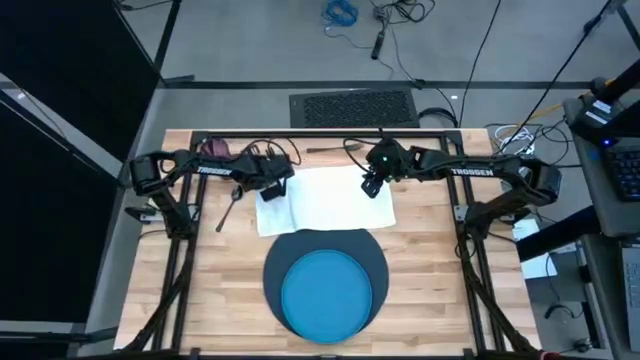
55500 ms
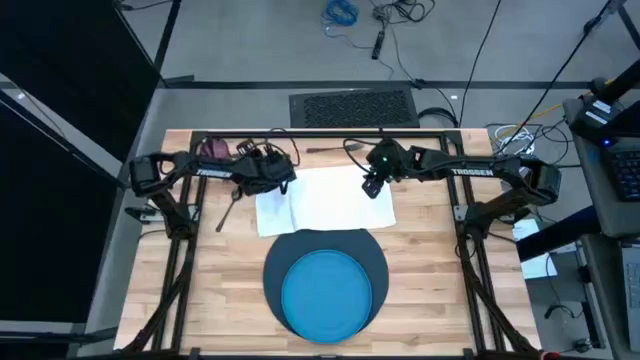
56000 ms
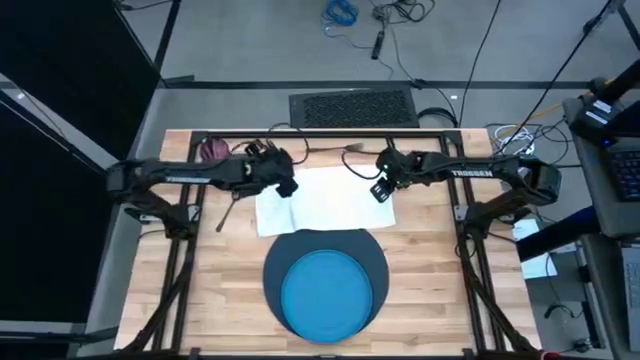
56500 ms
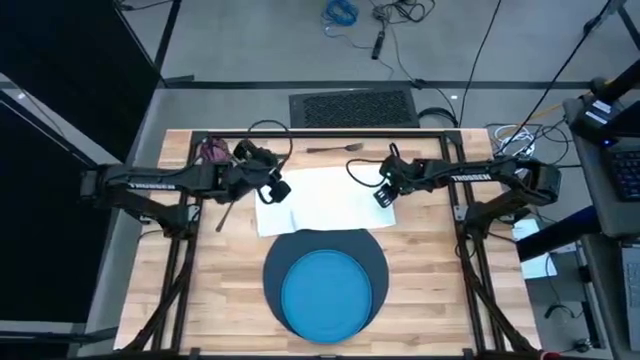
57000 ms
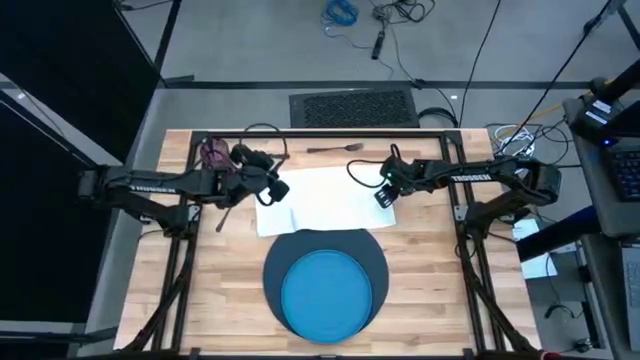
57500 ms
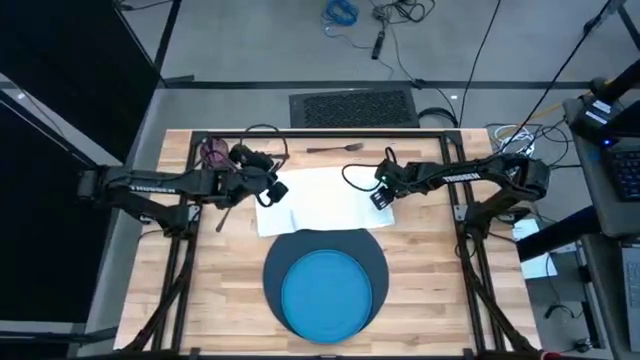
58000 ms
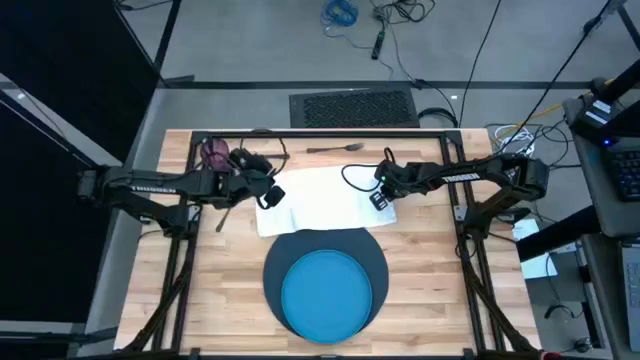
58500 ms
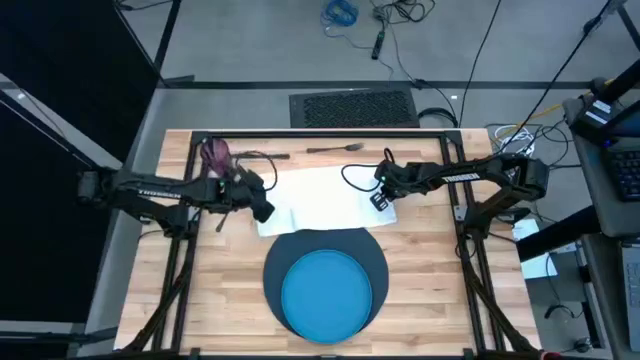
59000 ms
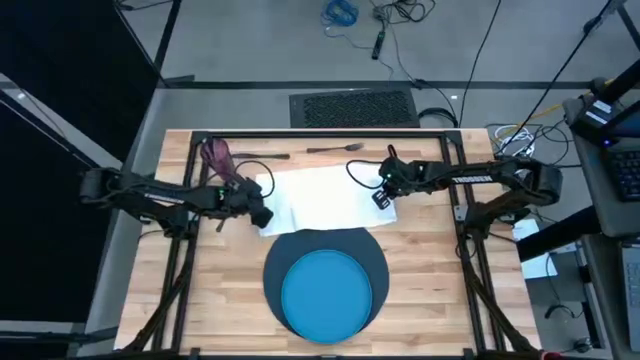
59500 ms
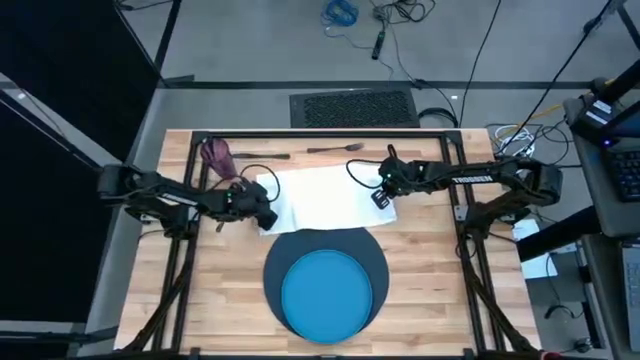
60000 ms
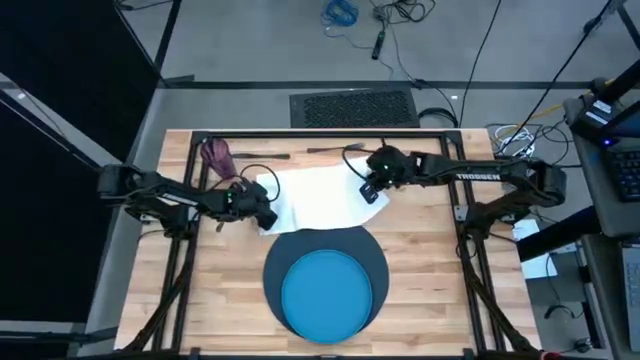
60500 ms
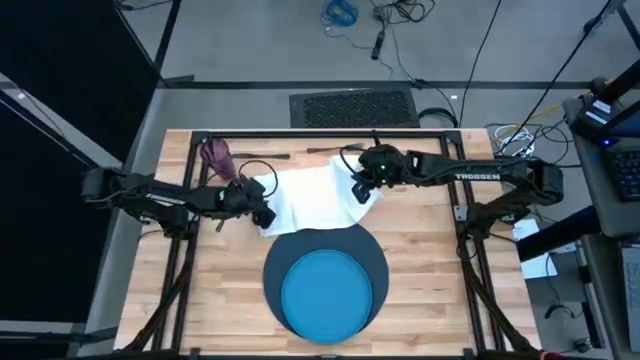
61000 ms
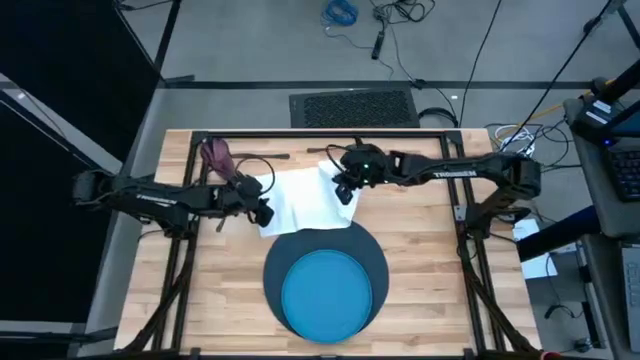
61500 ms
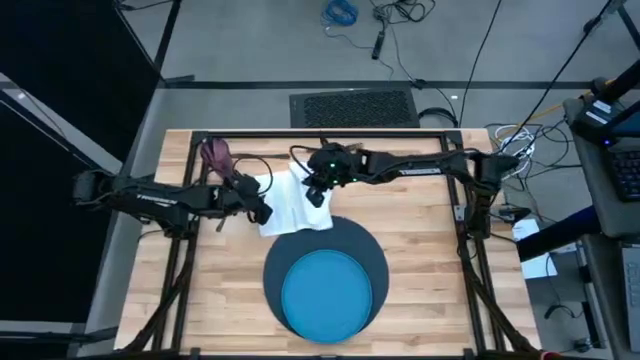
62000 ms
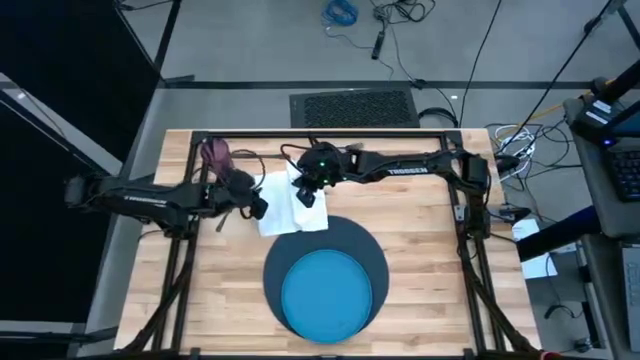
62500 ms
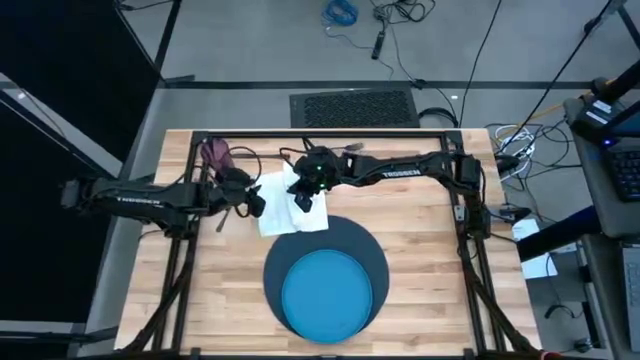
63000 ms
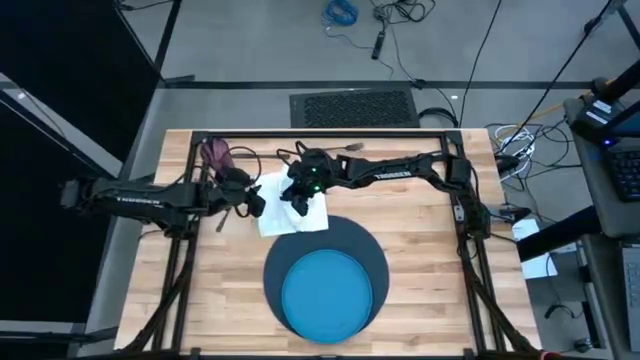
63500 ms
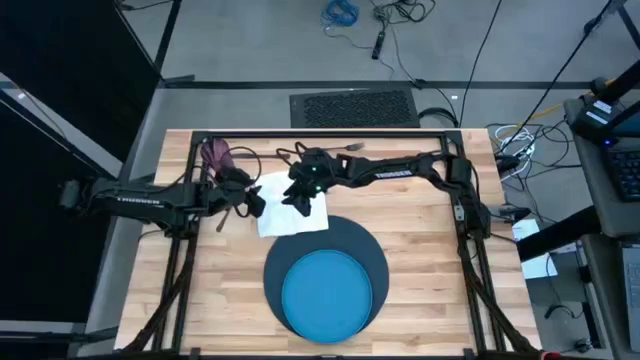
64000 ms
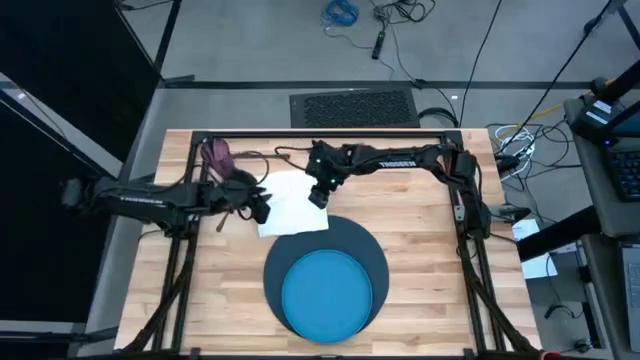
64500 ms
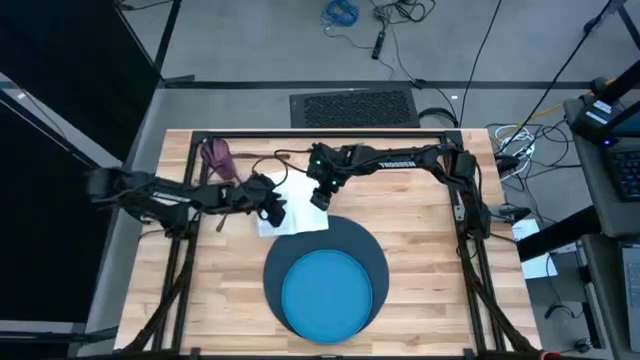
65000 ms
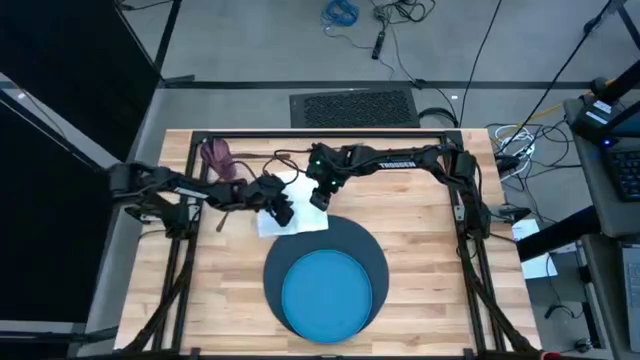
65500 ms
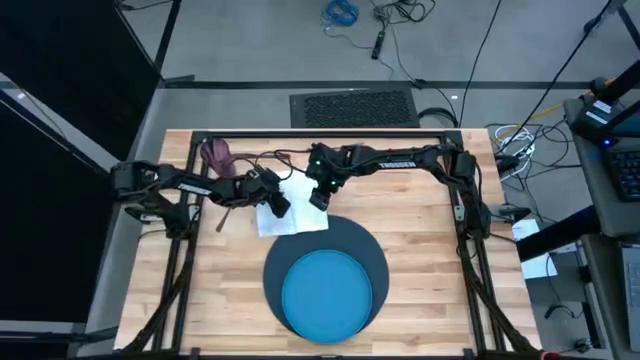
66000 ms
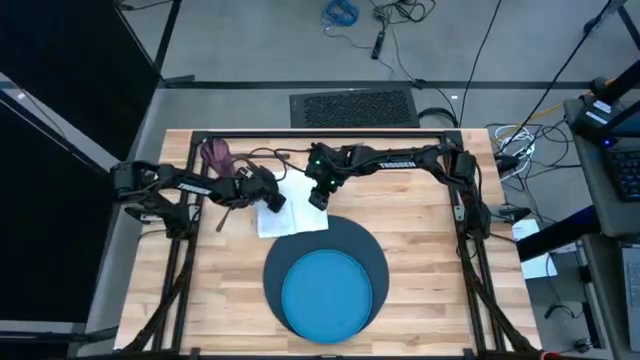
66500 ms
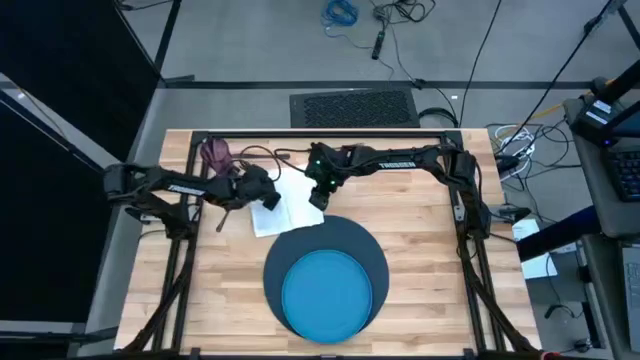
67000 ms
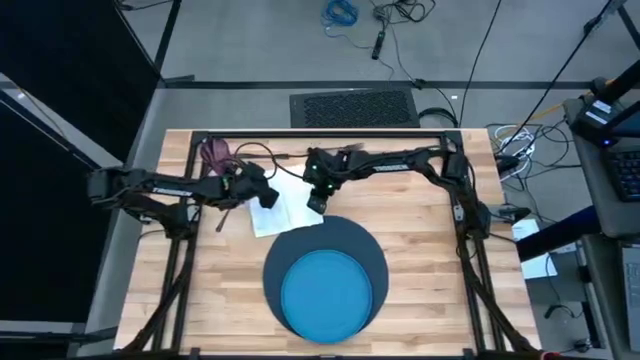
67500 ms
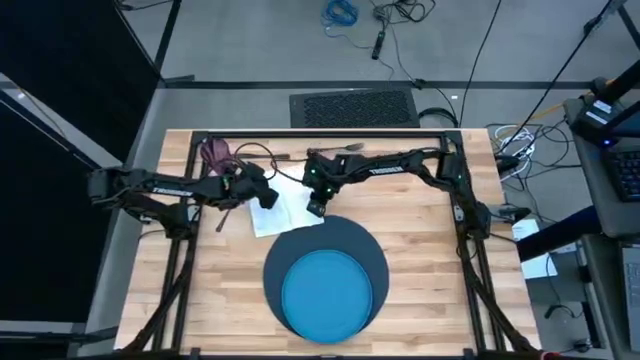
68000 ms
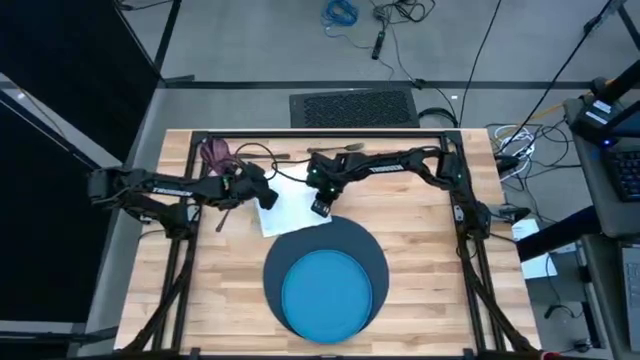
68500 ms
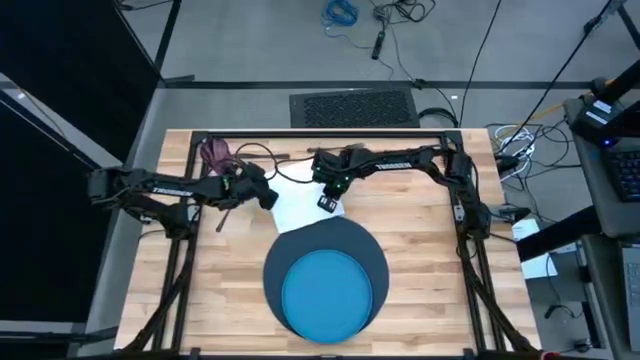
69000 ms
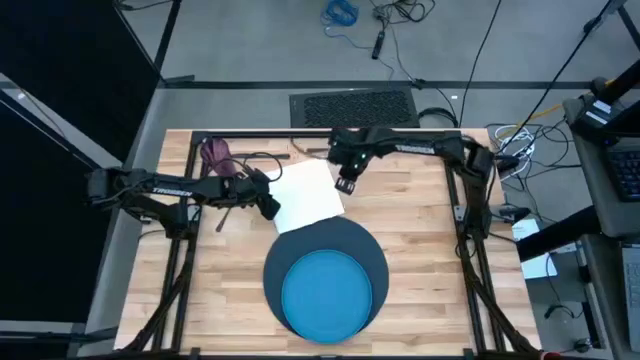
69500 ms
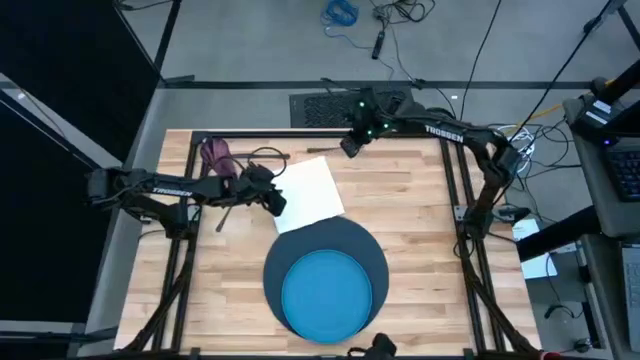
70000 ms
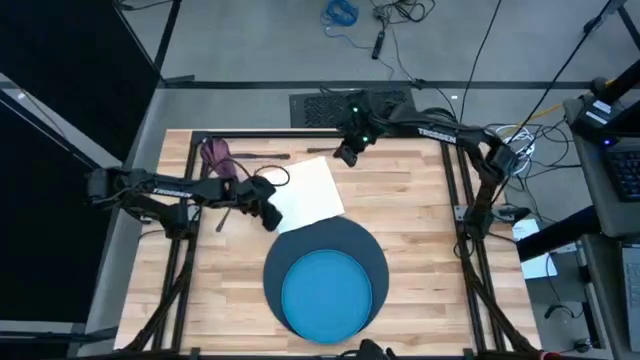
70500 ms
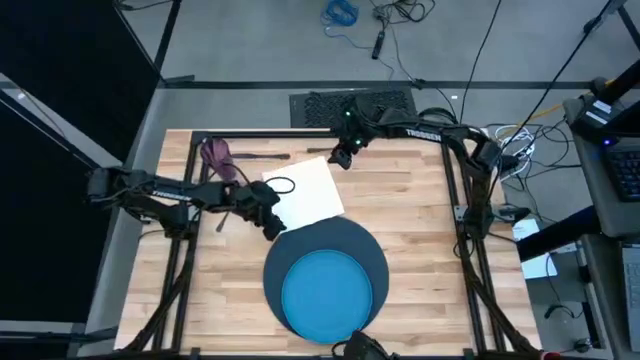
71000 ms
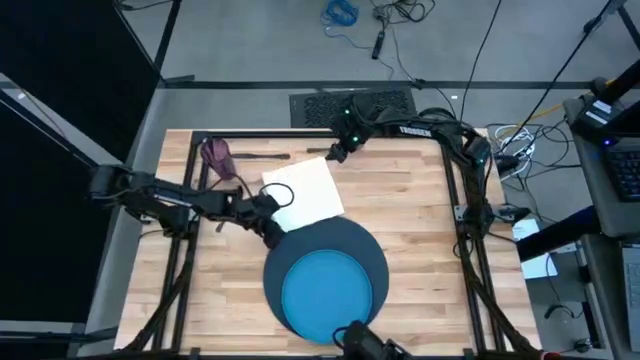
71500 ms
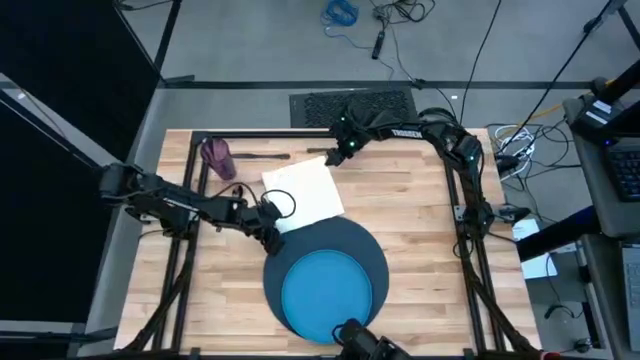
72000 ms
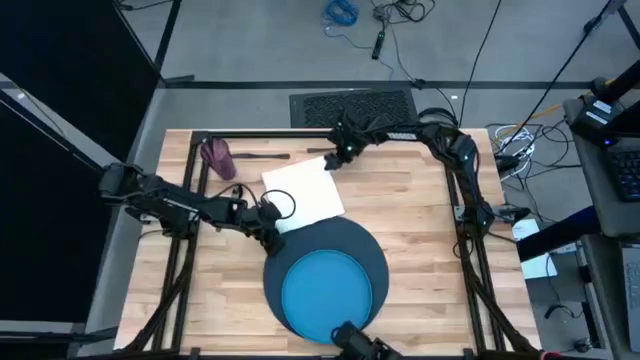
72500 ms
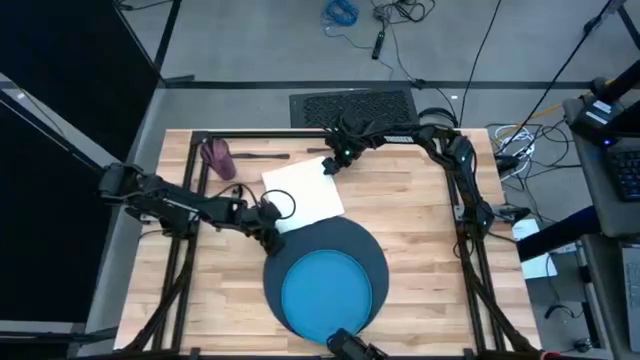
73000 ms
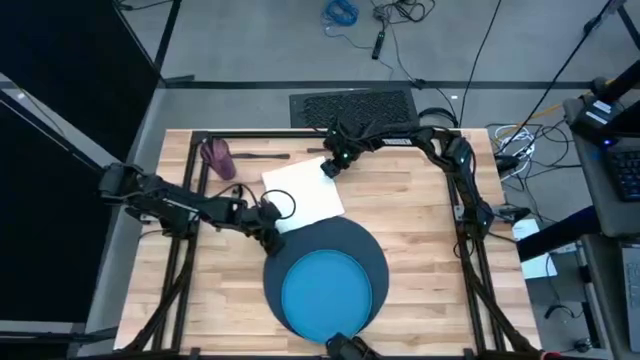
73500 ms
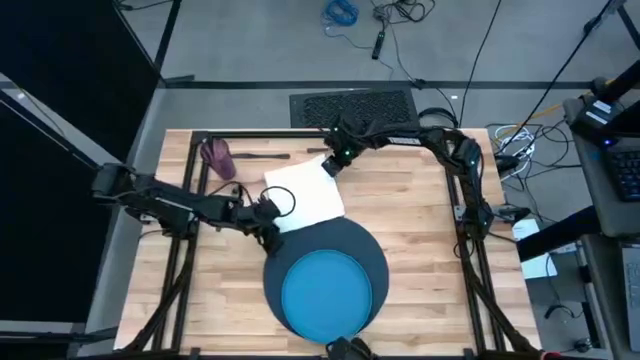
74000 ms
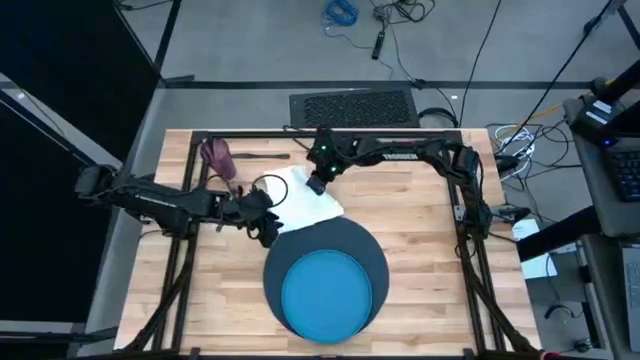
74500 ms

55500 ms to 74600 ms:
Task: Set table place
Fold the white table napkin

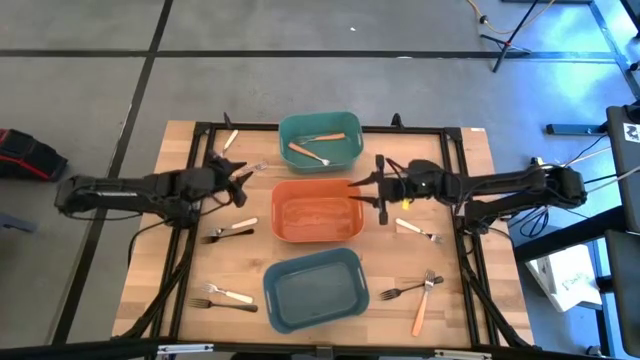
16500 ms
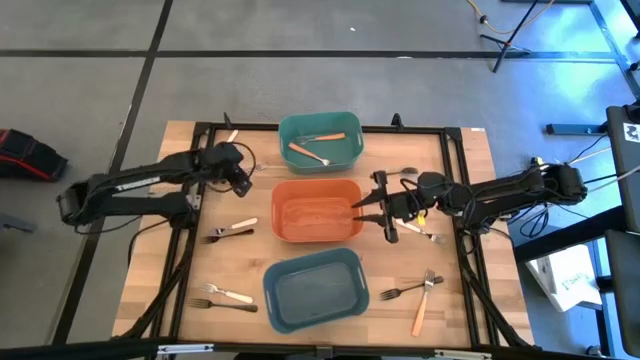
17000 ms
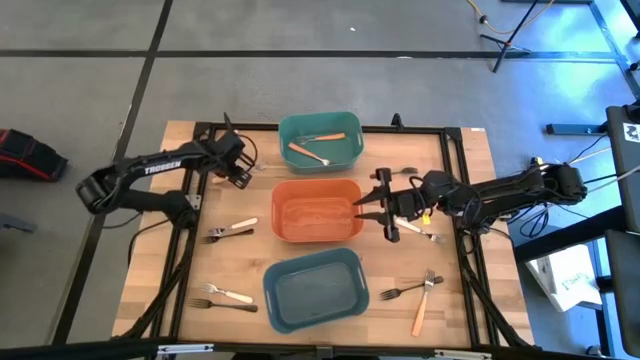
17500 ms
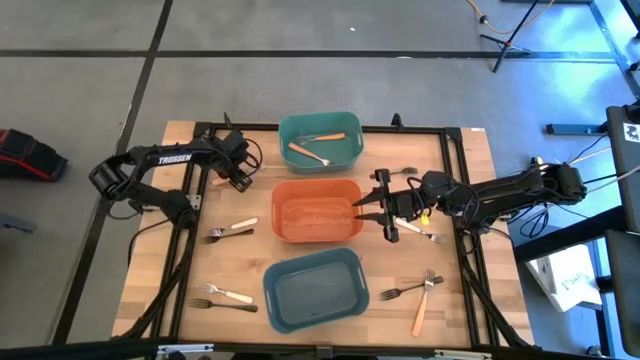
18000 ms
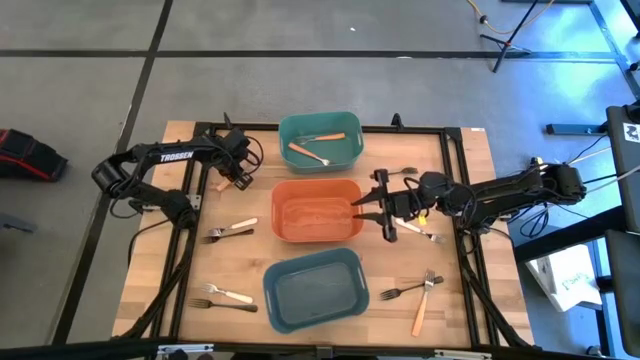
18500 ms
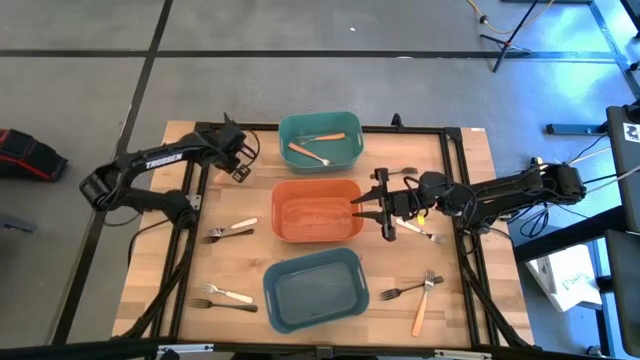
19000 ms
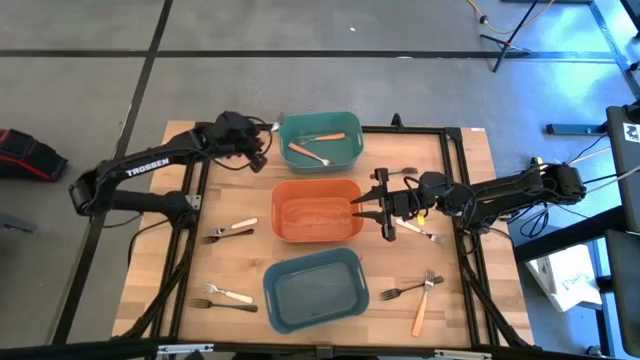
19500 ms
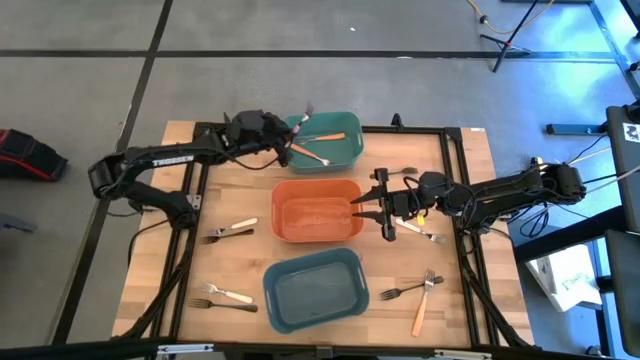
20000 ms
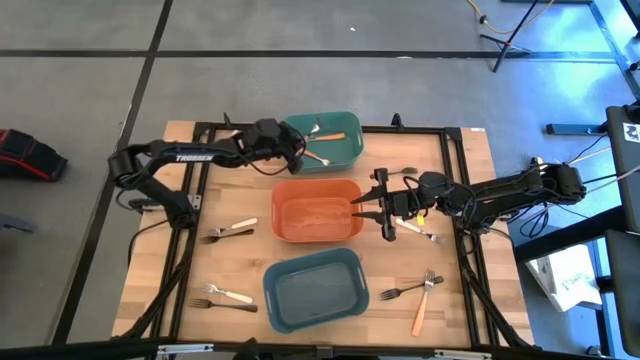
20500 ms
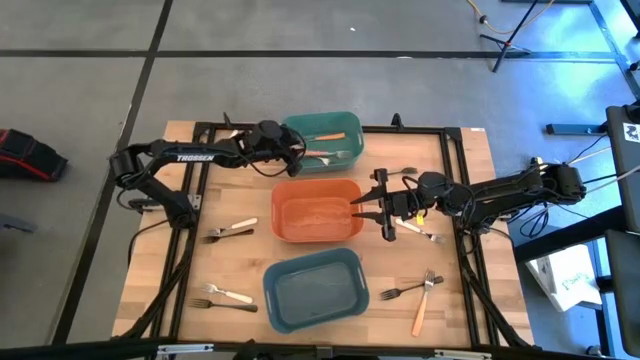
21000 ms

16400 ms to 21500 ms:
Task: Sort silverware by color (type)
Put the orange fork into the green bin
